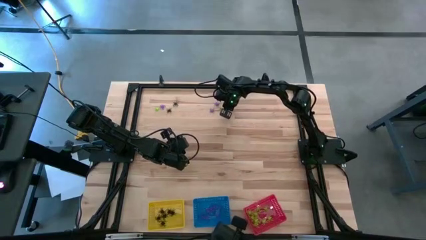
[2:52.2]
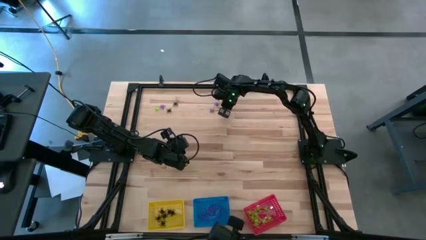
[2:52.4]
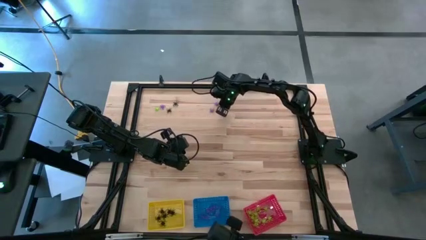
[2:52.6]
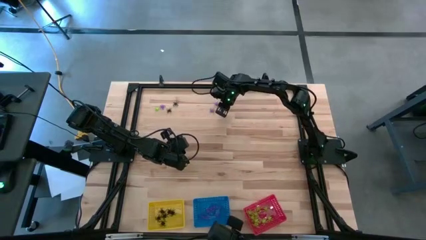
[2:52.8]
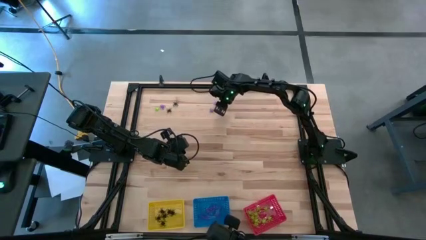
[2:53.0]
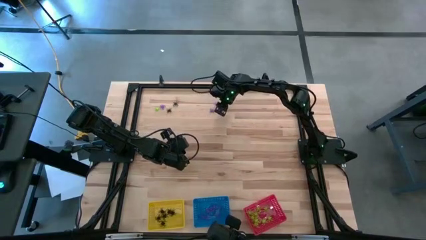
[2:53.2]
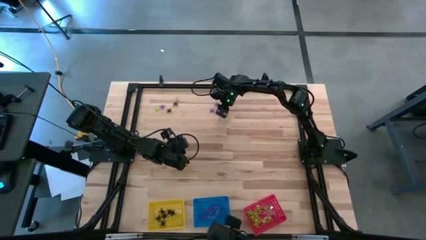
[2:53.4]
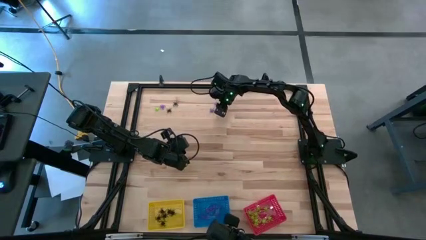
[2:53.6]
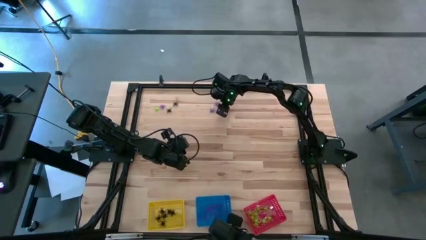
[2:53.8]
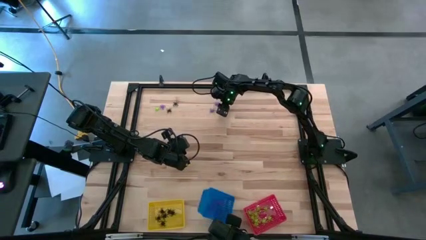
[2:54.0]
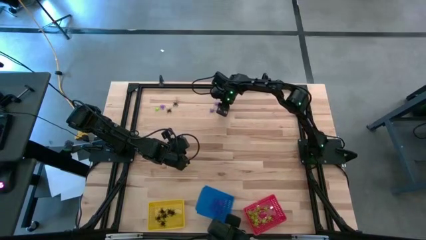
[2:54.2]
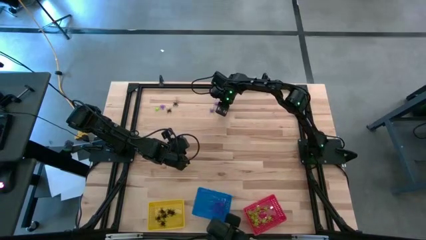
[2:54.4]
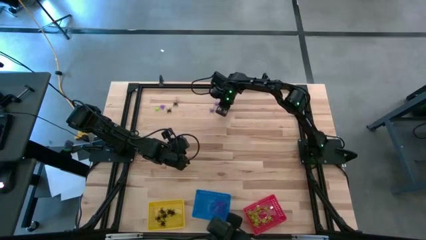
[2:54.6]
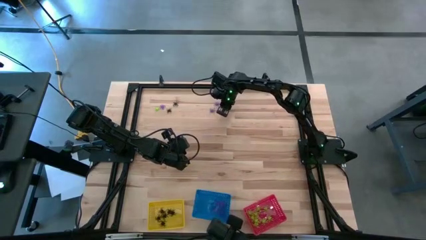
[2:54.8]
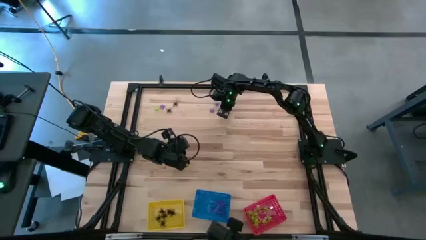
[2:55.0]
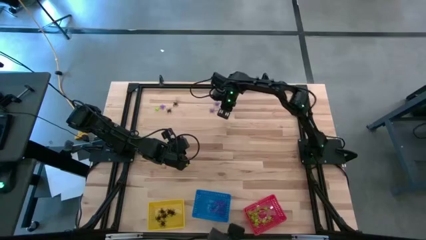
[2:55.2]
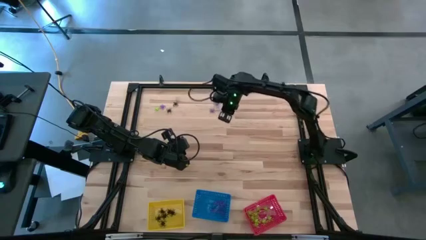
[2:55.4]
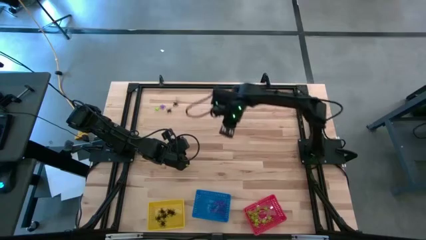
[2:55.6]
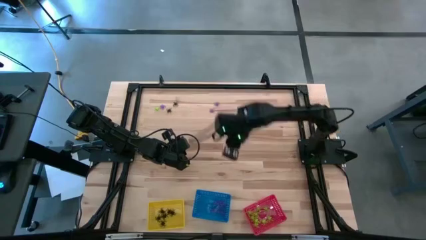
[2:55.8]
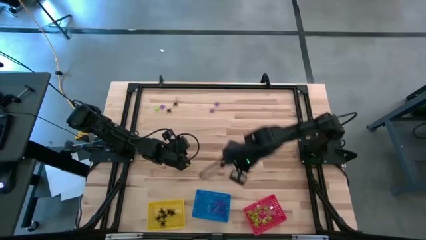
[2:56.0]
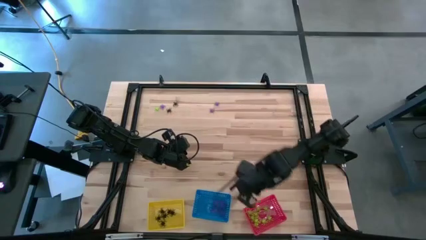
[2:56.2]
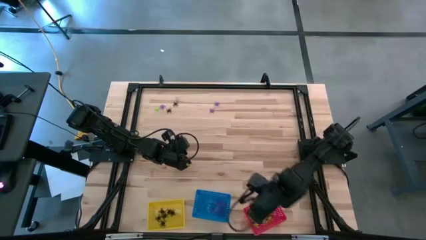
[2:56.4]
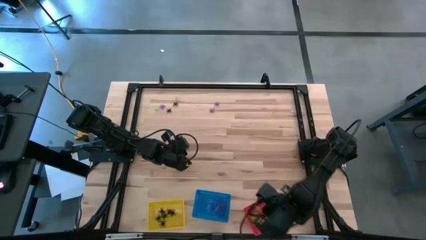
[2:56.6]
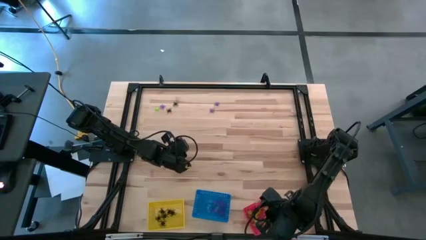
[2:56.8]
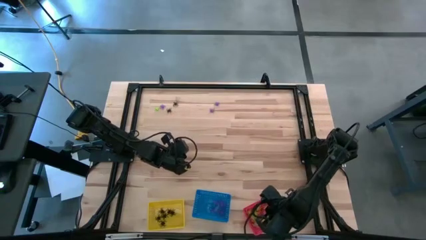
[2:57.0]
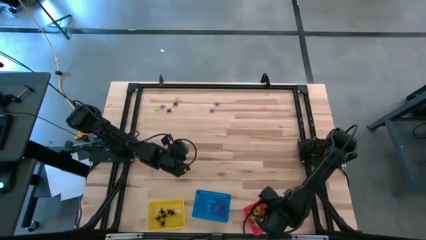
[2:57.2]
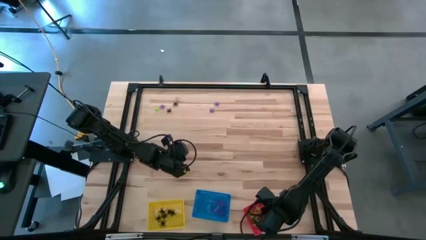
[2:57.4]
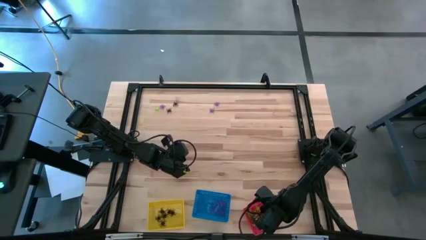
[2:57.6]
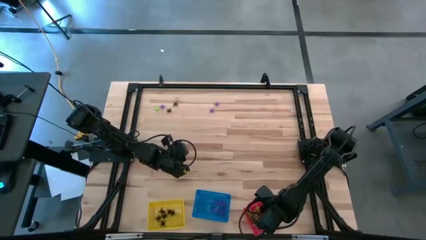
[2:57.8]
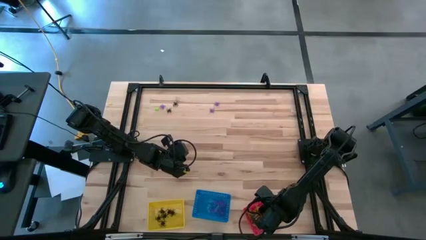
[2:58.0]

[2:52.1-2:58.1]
Task: Sort Halloween decoration
Put the green spider toy into the red bin

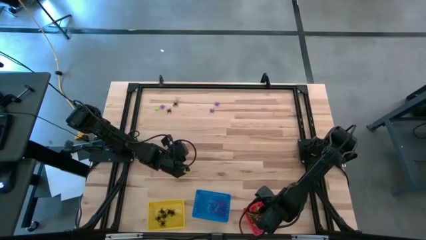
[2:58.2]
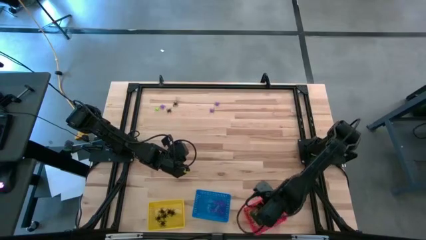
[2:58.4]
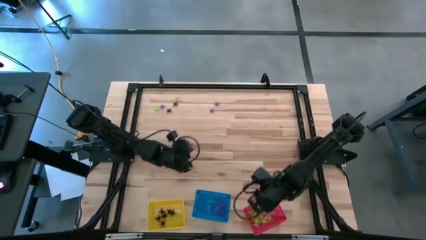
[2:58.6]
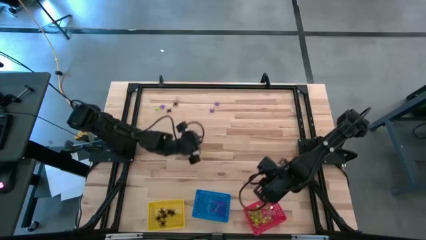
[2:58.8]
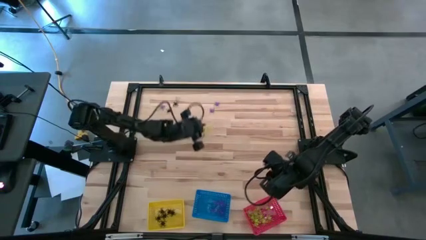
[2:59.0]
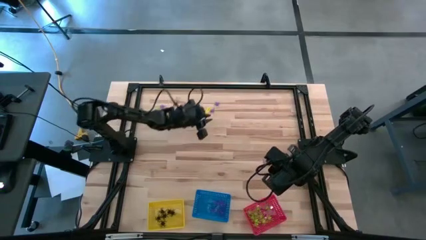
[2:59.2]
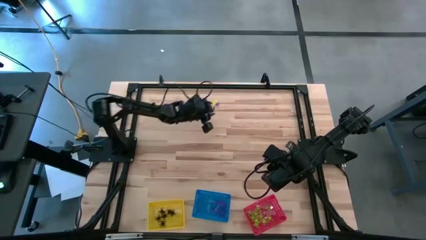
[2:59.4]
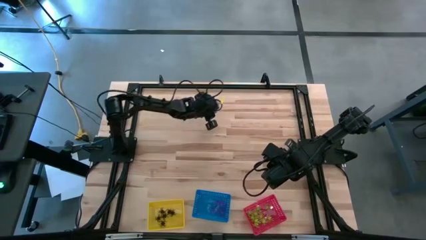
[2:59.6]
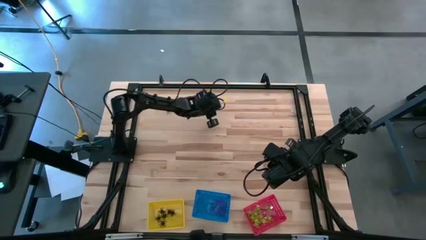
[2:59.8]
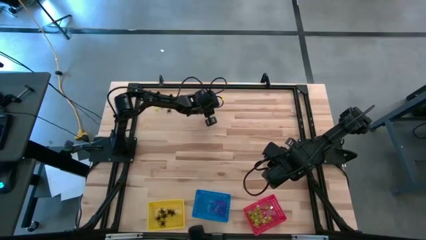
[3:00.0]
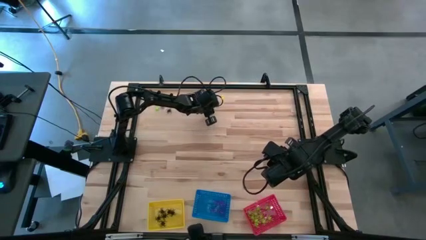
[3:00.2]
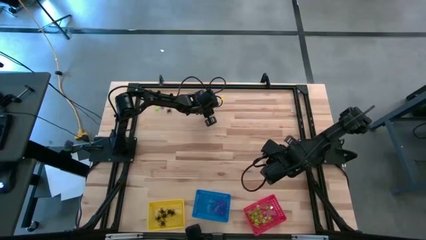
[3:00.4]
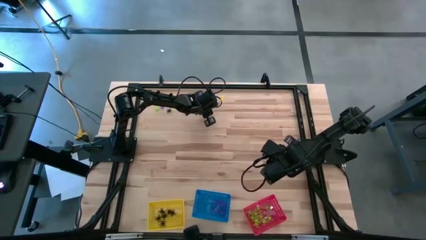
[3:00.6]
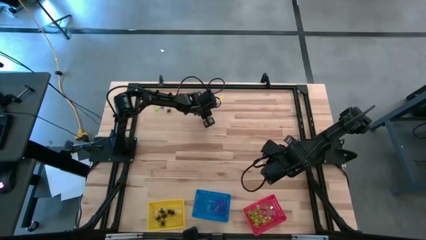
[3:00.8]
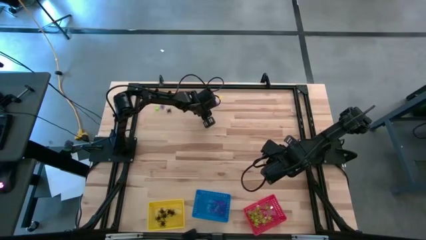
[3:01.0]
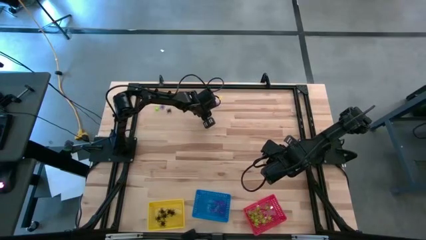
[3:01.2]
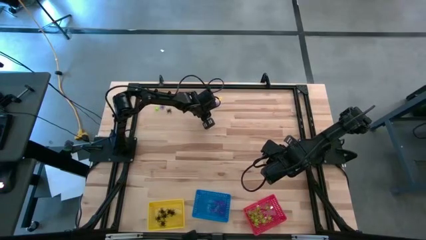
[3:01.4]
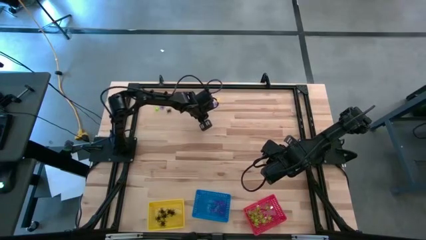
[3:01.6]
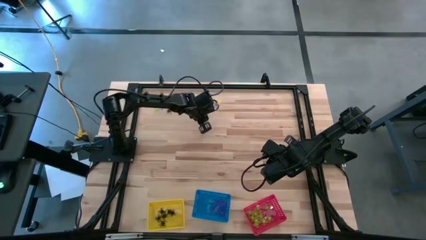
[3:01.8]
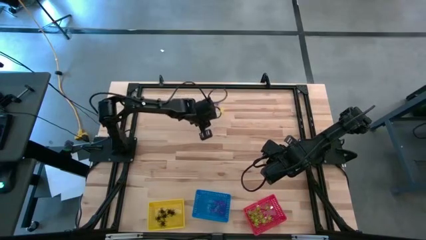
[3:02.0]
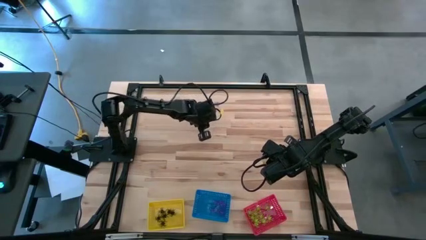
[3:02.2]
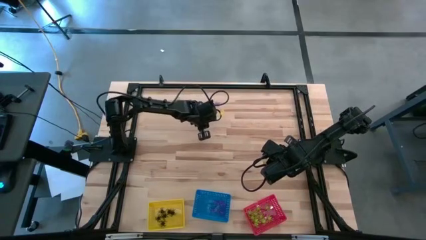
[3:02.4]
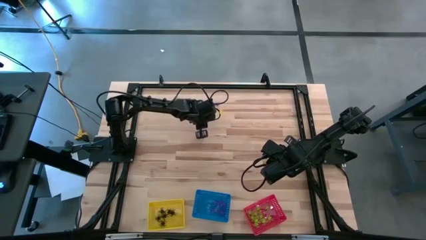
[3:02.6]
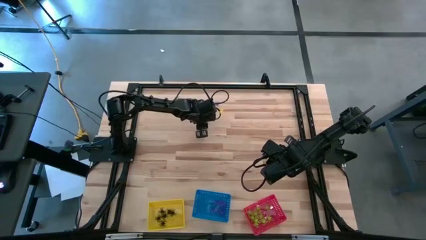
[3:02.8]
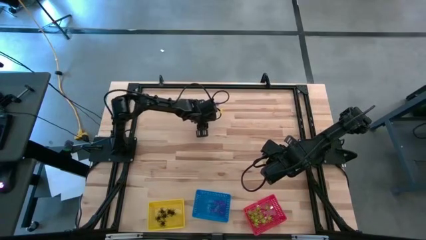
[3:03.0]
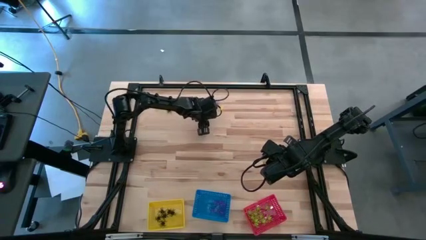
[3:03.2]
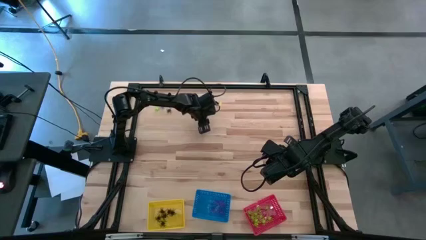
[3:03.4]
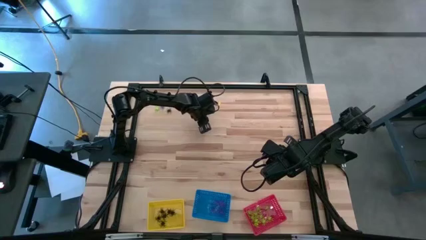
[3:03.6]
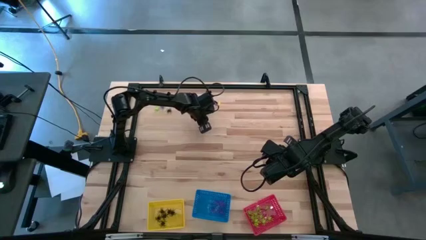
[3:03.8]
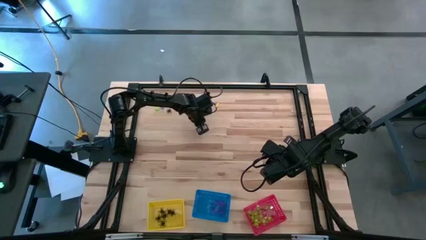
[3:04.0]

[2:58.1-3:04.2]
Put the violet spider toy into the blue bin

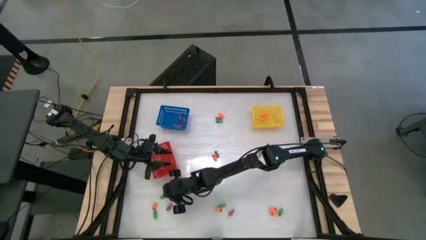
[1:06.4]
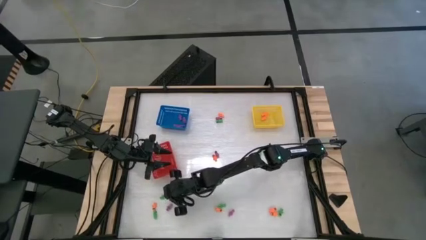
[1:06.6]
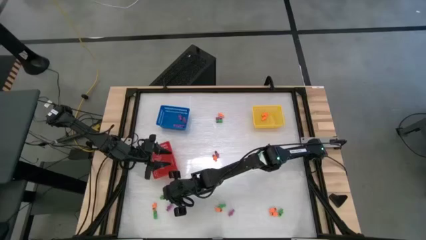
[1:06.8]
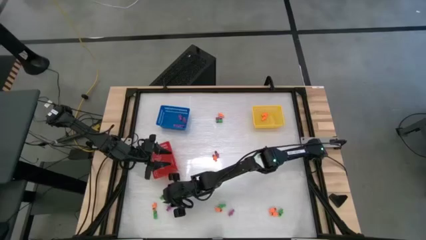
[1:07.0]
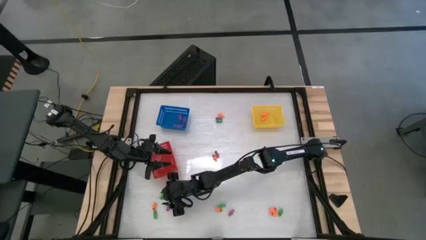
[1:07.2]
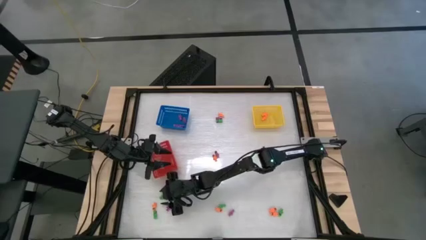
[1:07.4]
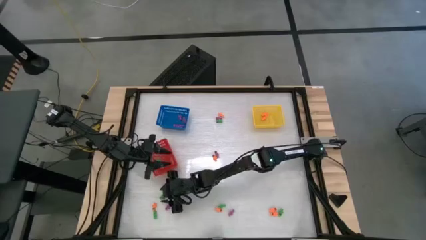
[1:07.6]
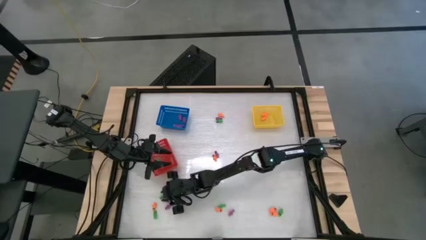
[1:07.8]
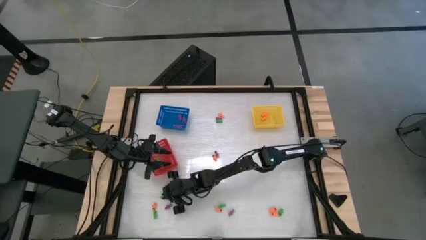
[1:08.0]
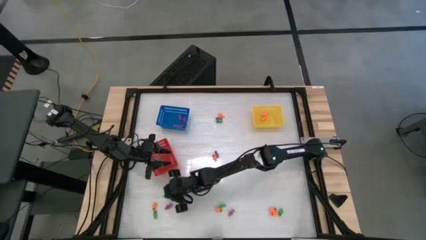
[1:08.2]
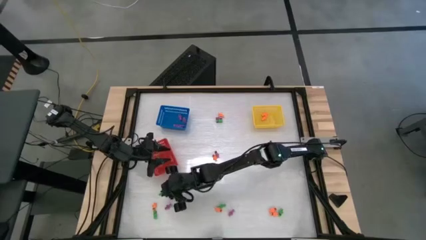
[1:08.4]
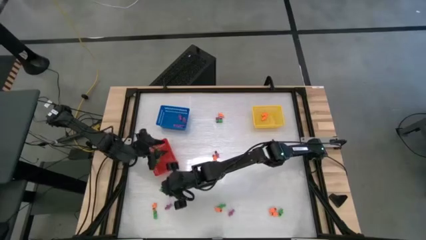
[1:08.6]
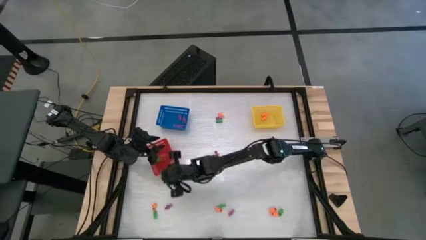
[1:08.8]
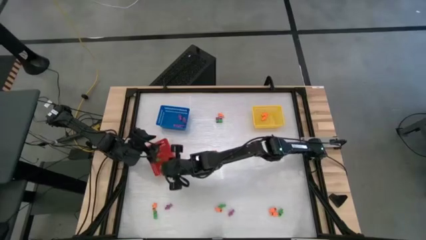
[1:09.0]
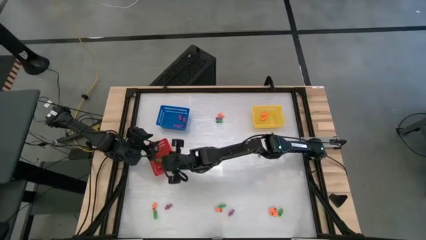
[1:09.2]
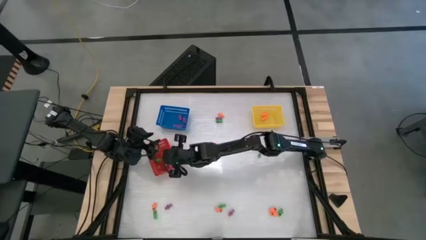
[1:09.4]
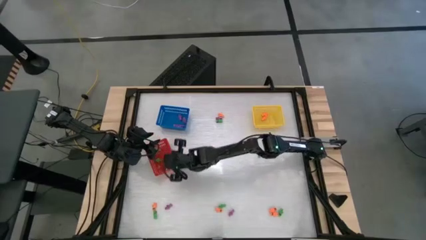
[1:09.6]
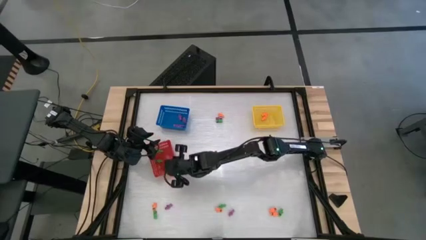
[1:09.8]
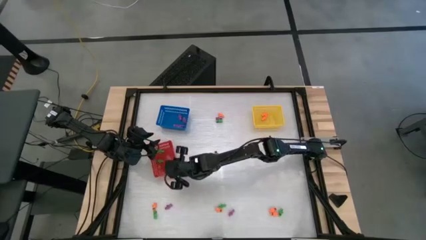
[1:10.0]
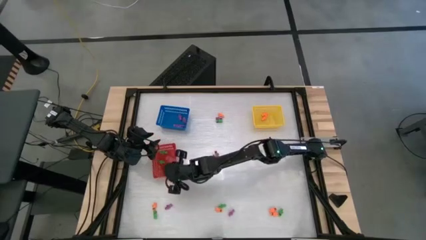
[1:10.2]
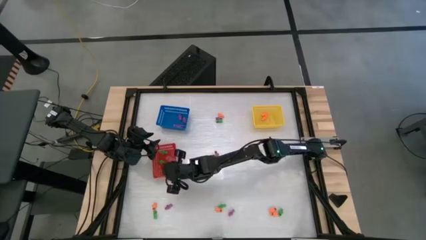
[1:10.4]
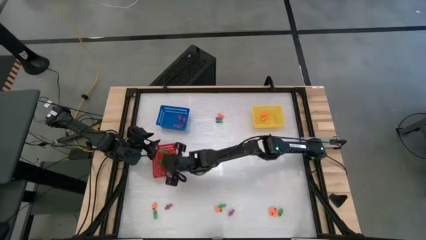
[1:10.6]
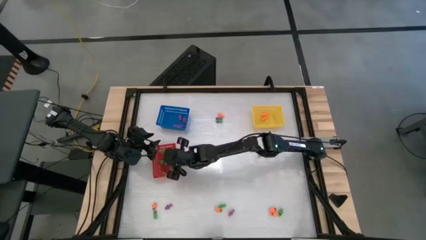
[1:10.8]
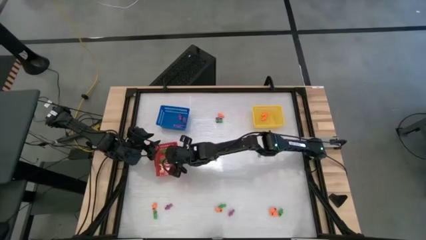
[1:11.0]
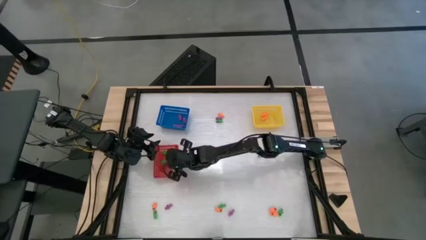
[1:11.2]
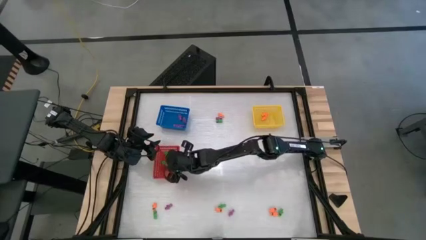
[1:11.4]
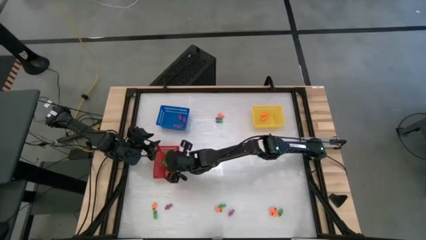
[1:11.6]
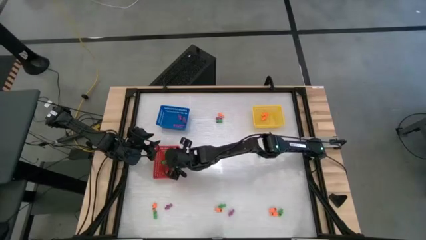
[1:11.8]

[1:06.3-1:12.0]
Task: Sort Halloween decoration
Put the green skeleton toy into the red bin
